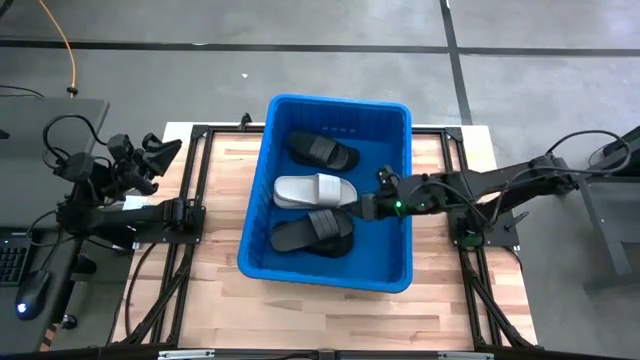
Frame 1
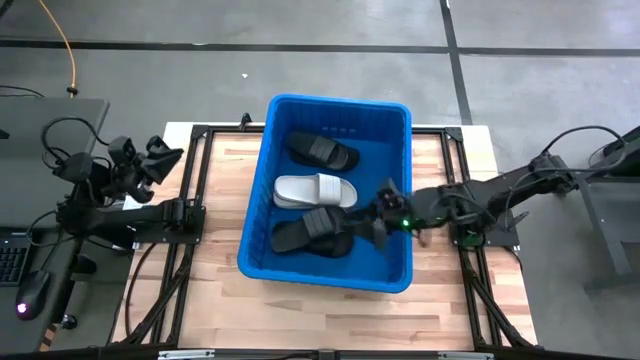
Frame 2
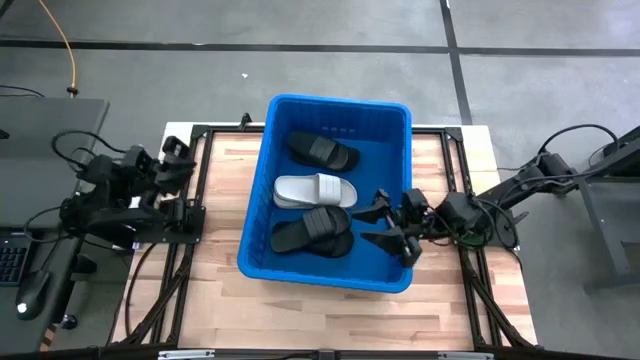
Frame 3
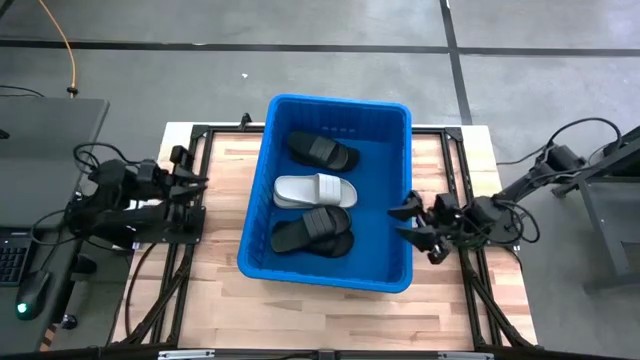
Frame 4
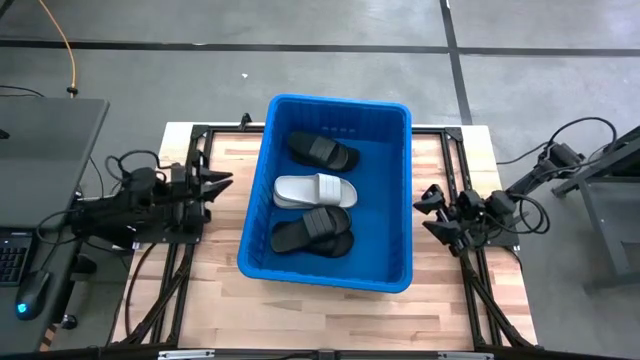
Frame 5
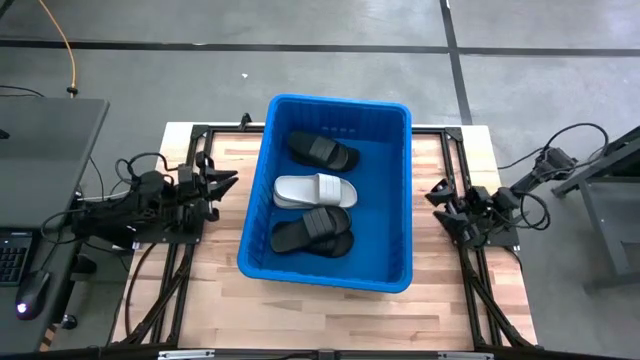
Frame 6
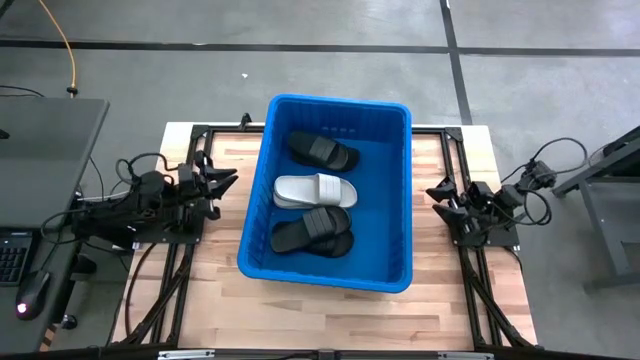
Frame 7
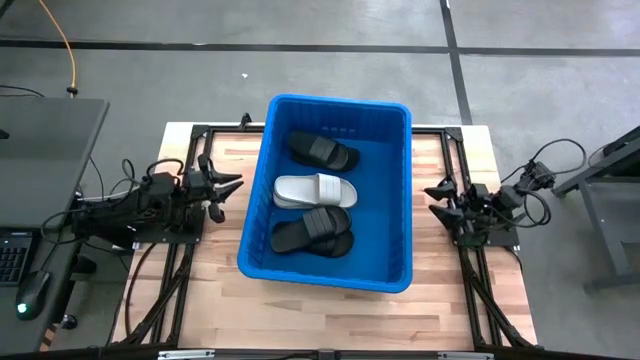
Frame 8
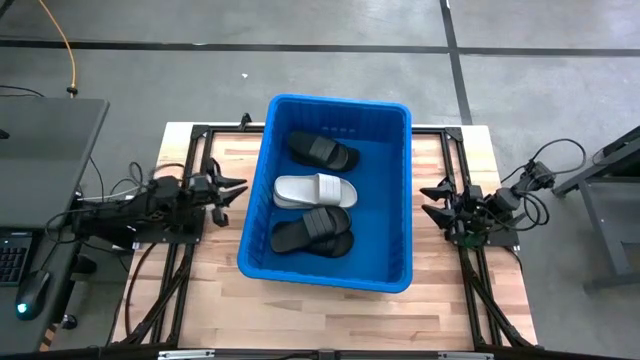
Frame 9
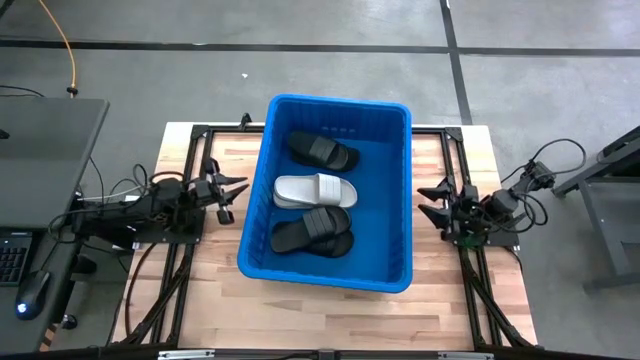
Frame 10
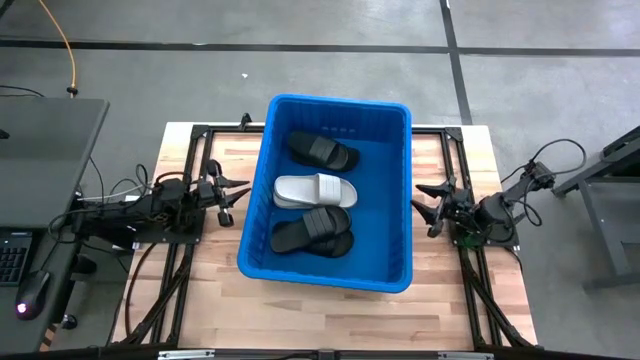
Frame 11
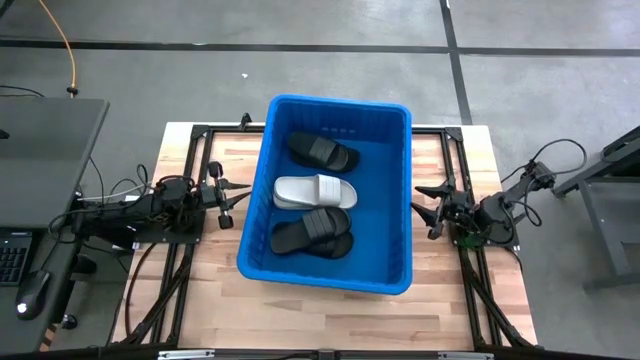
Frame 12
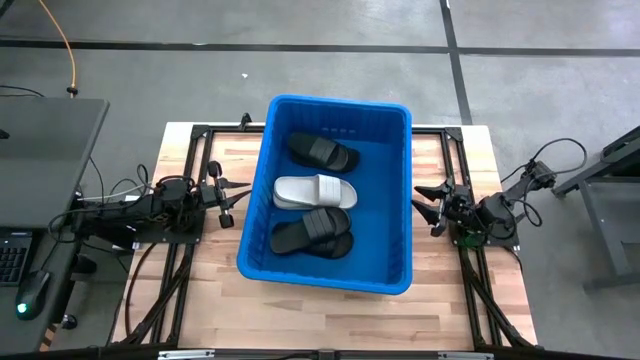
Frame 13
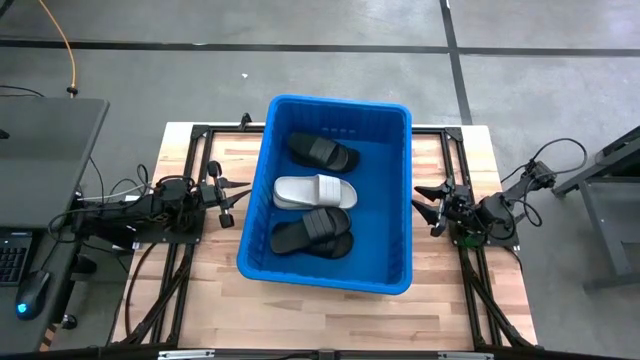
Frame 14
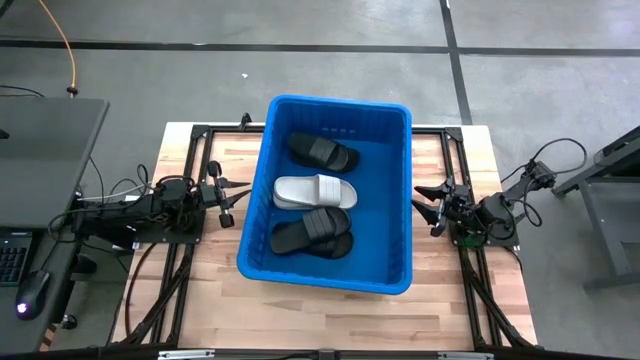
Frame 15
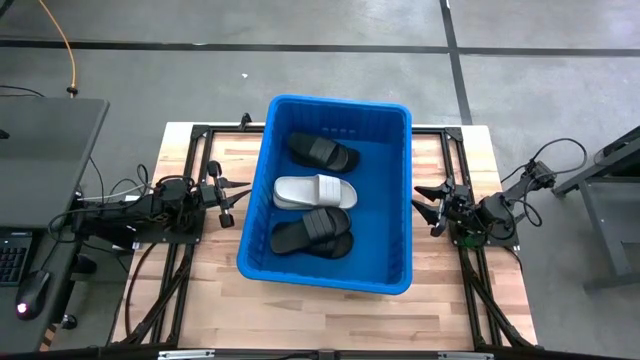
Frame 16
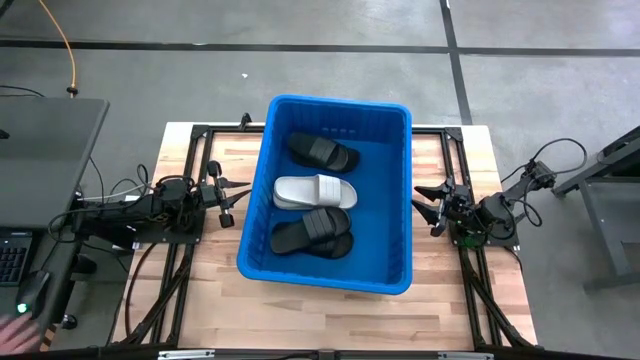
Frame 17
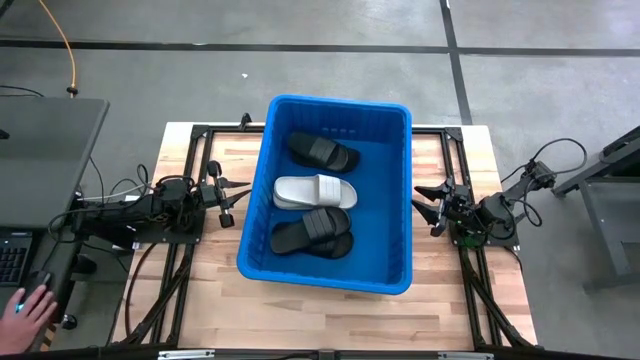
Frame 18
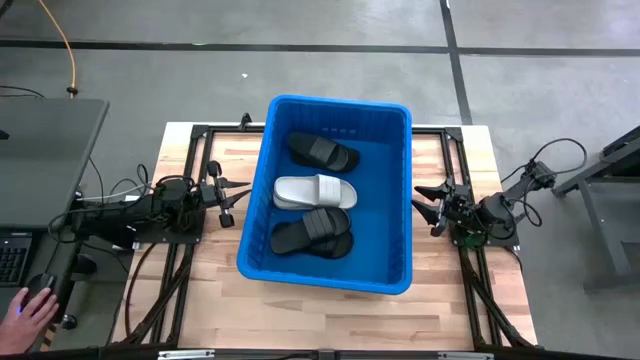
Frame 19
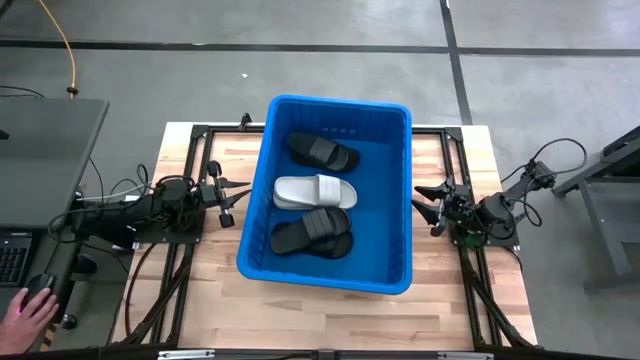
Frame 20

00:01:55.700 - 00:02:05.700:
Task: Pick and place slides into bin
Return to Home Position

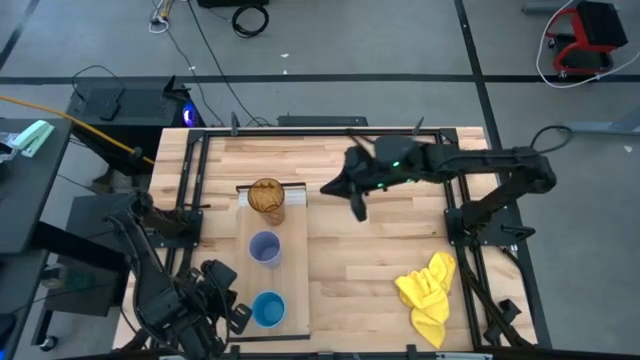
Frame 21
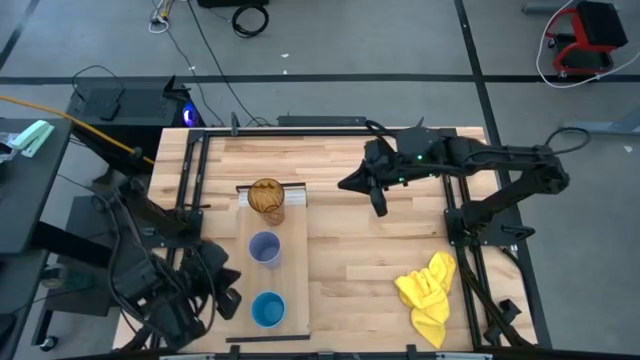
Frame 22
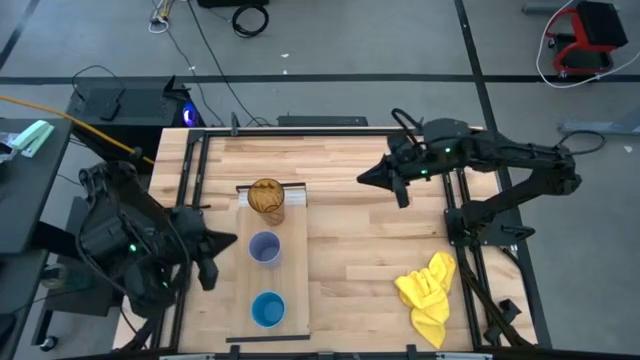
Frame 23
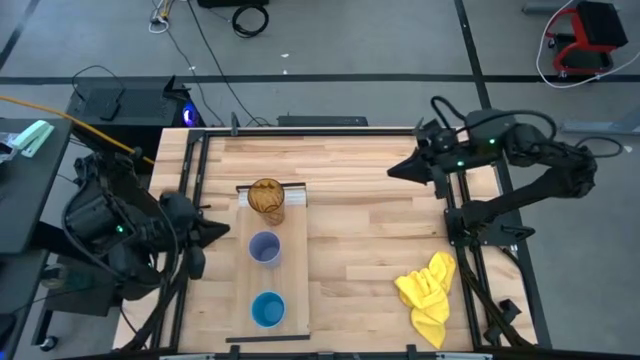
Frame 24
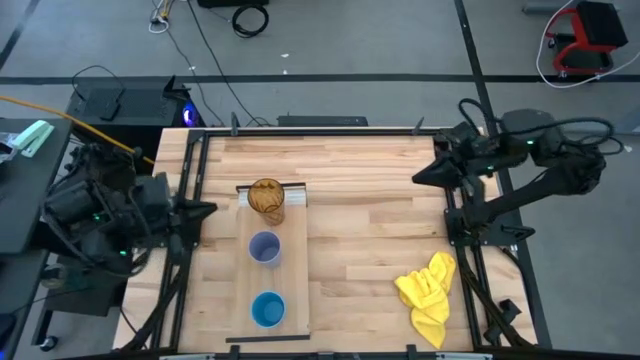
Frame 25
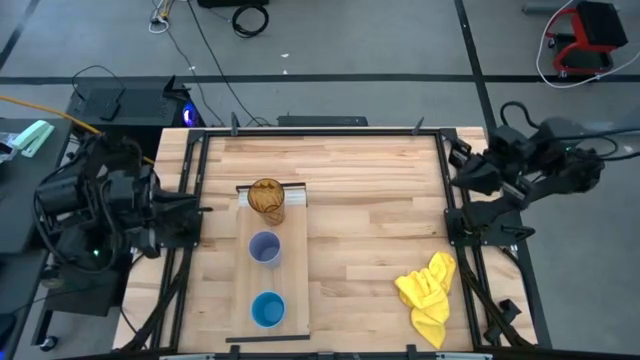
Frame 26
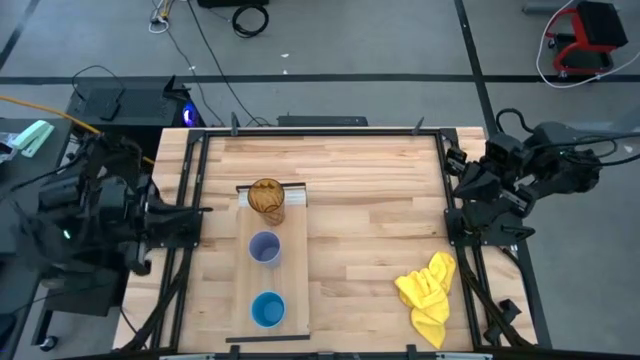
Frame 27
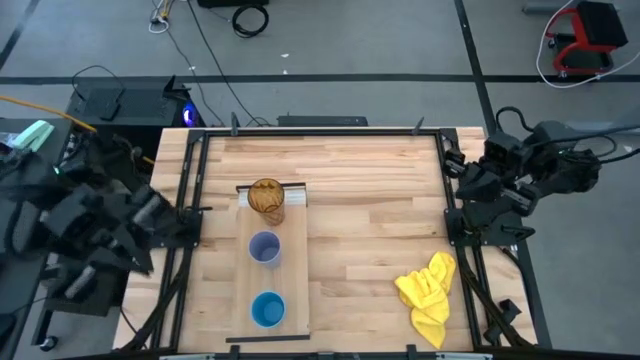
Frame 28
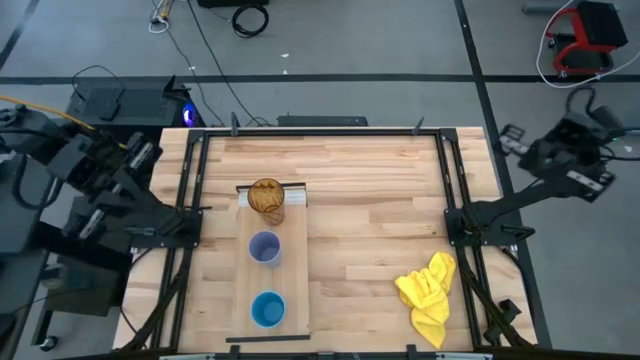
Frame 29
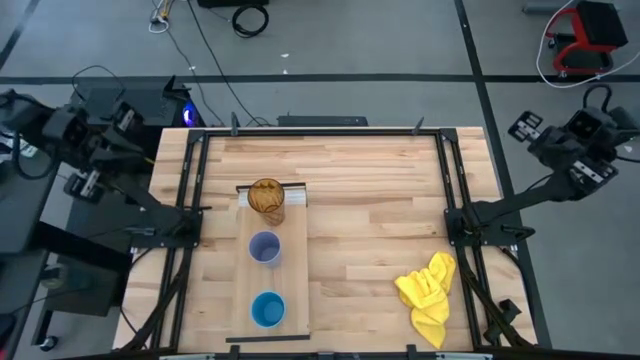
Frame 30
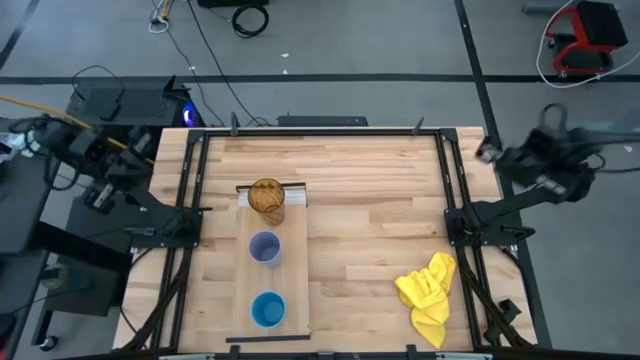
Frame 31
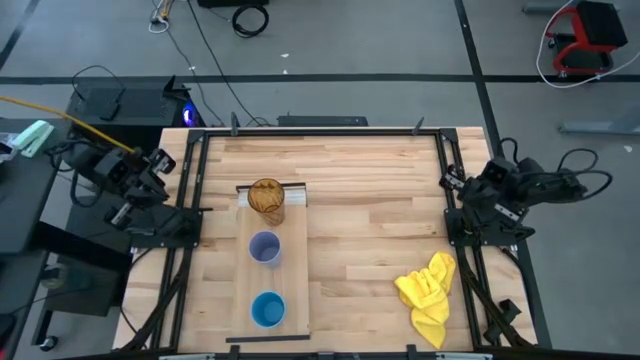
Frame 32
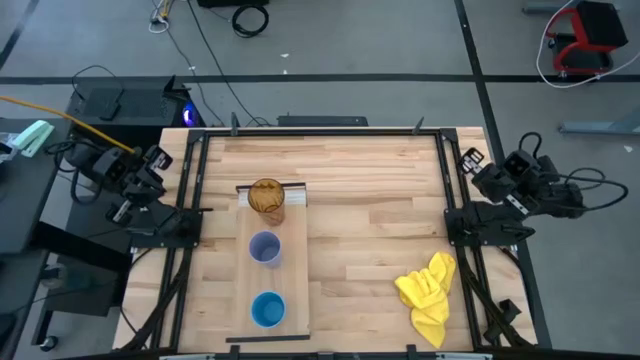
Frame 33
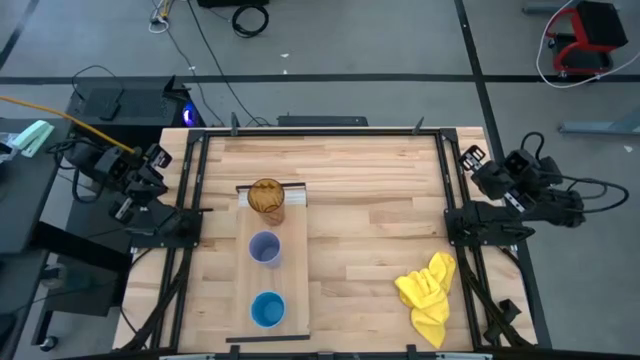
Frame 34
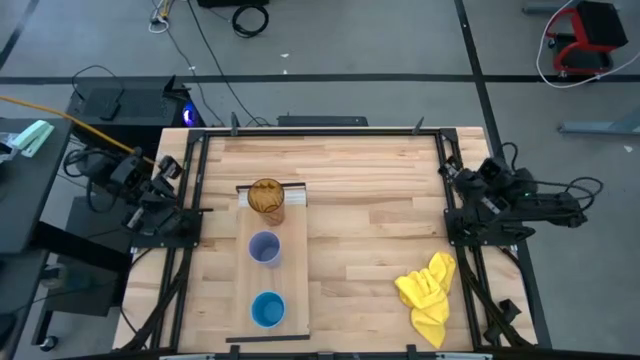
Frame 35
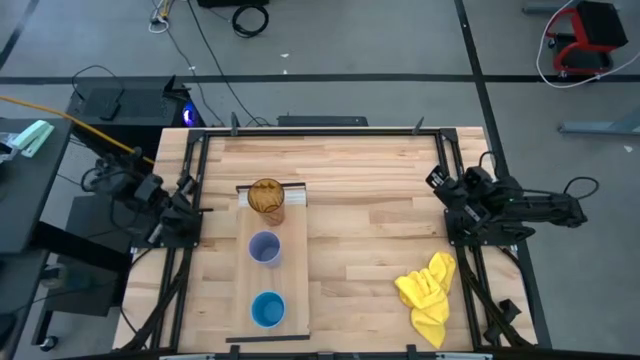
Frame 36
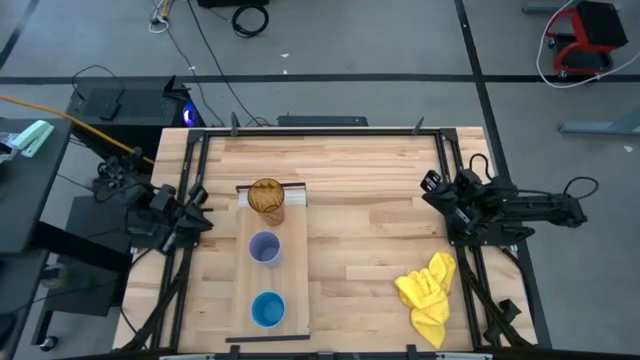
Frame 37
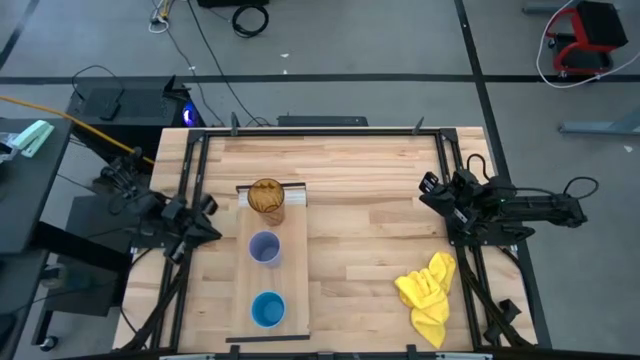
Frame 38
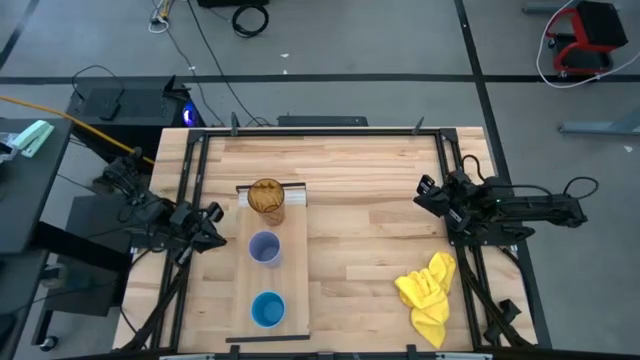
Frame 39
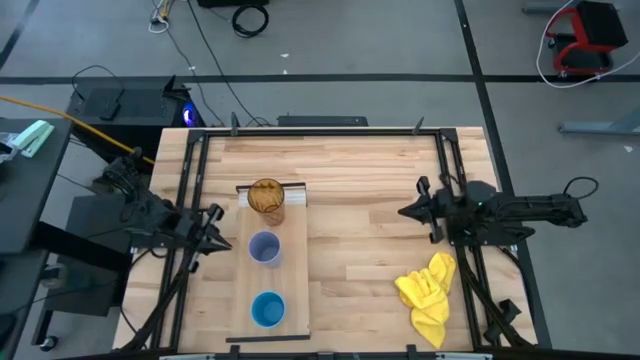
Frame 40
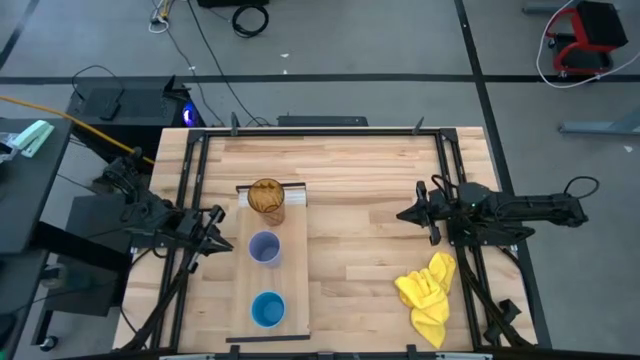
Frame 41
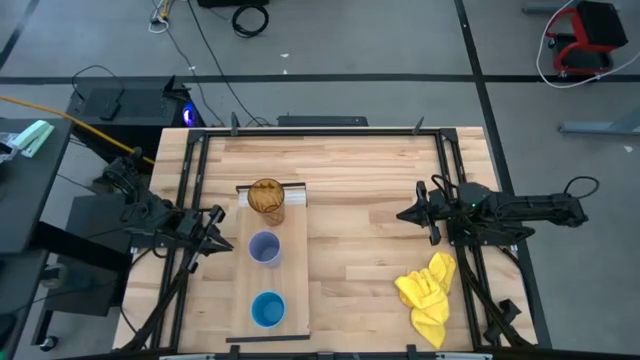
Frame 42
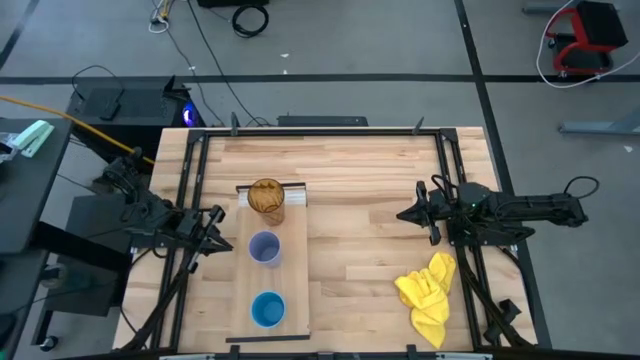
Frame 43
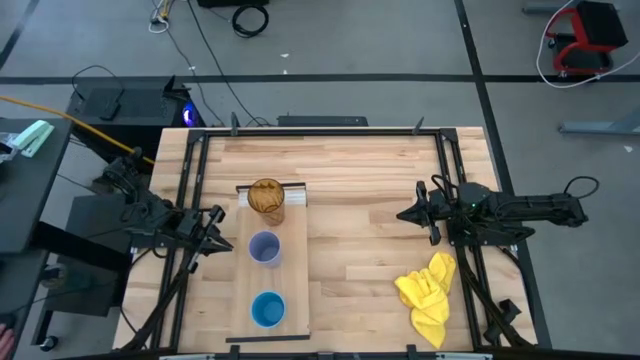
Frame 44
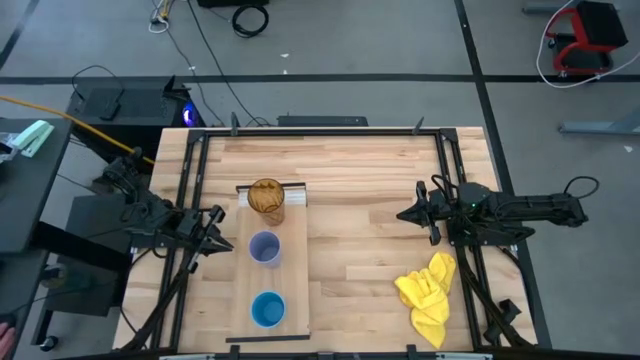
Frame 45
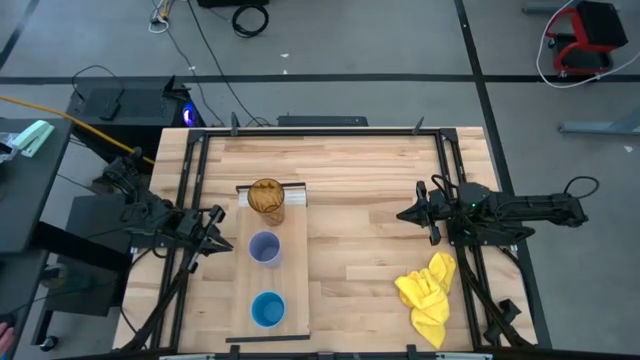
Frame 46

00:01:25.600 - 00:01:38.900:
Task: Stack small to large cups/mugs on shelf
Return to Home Position
